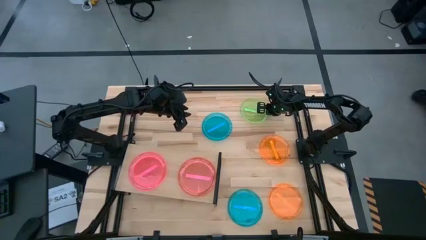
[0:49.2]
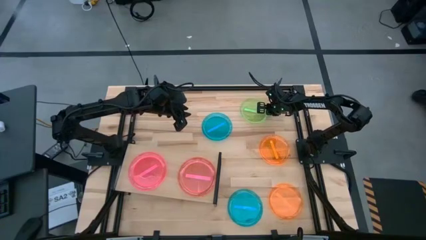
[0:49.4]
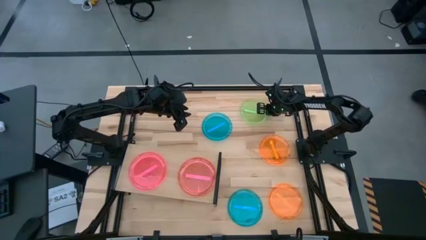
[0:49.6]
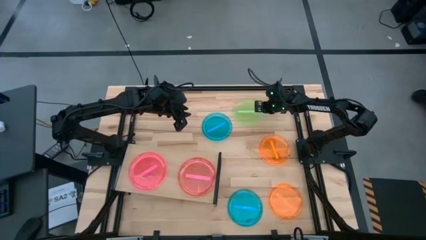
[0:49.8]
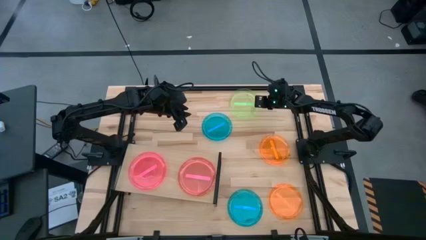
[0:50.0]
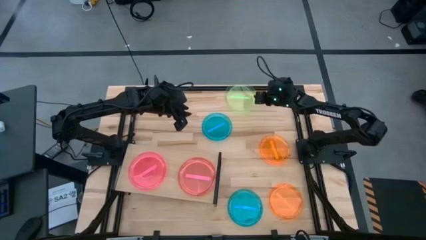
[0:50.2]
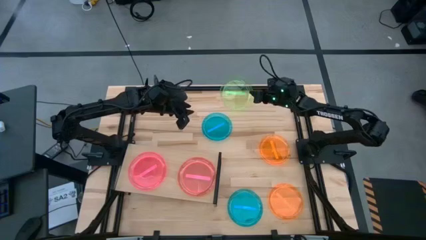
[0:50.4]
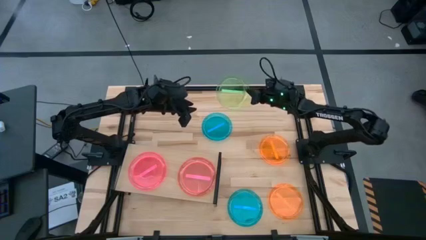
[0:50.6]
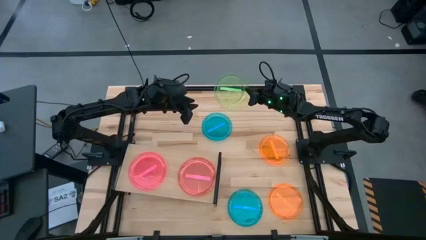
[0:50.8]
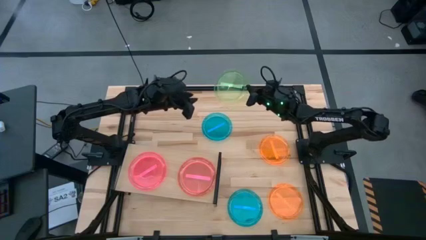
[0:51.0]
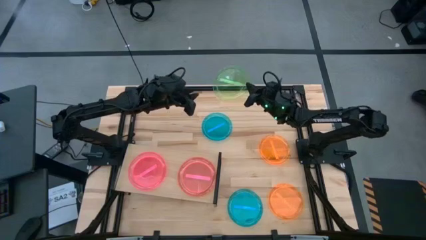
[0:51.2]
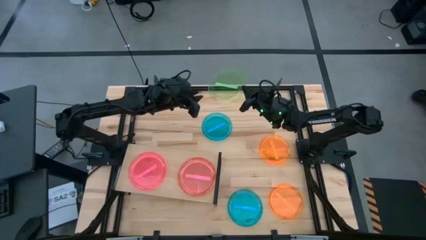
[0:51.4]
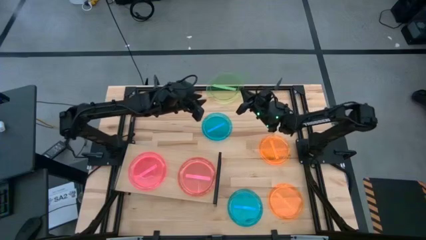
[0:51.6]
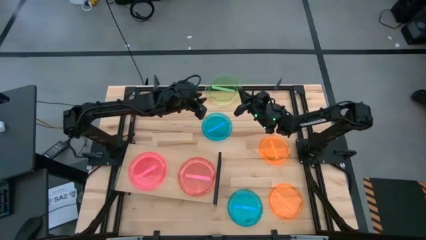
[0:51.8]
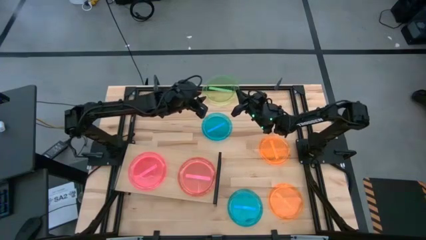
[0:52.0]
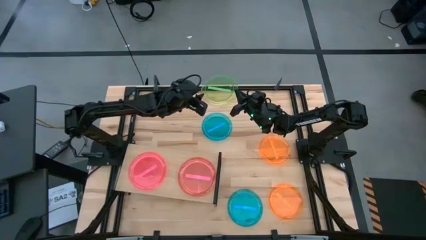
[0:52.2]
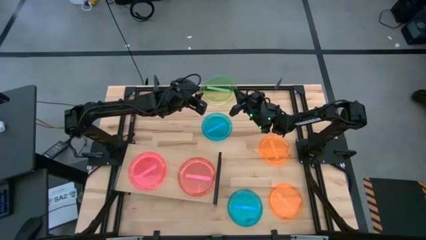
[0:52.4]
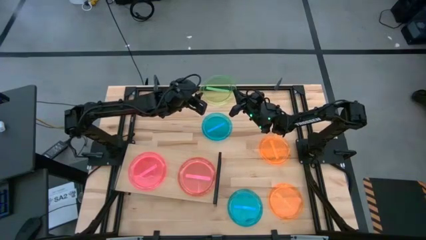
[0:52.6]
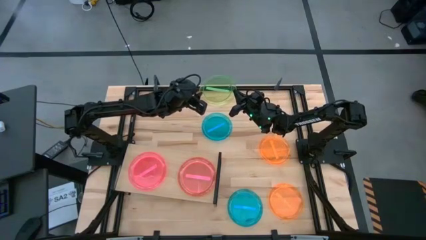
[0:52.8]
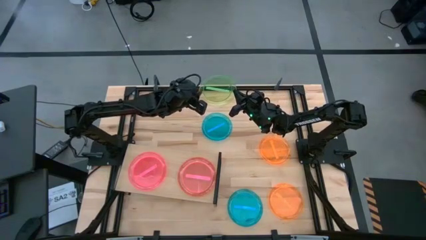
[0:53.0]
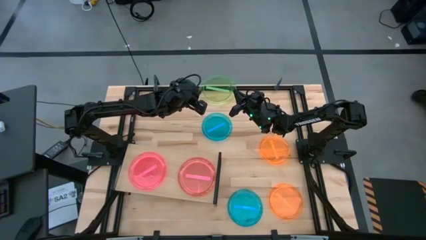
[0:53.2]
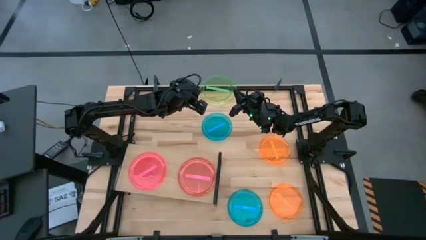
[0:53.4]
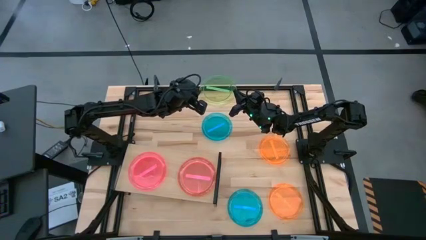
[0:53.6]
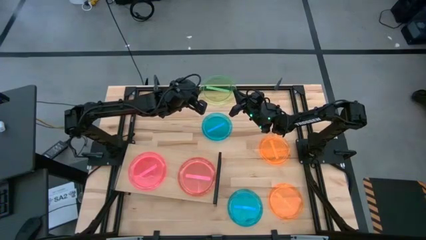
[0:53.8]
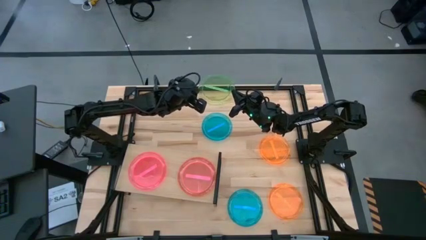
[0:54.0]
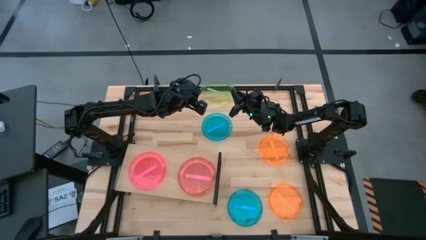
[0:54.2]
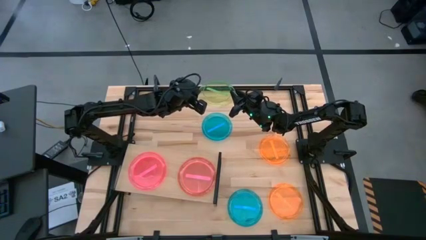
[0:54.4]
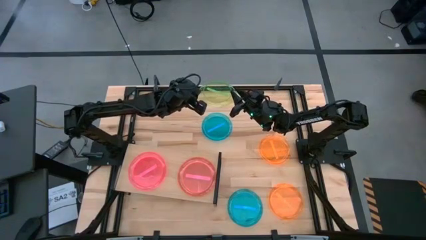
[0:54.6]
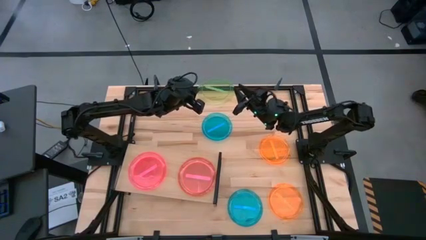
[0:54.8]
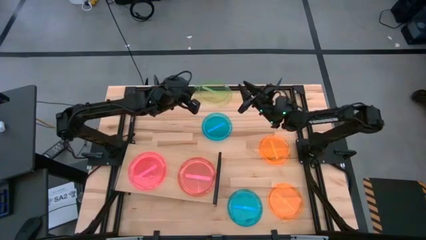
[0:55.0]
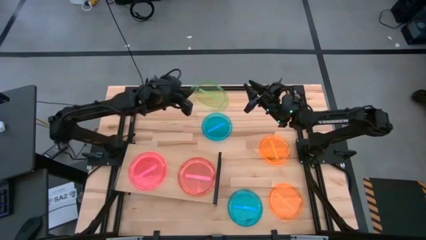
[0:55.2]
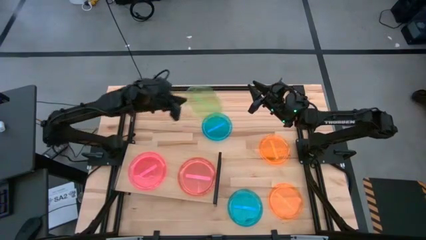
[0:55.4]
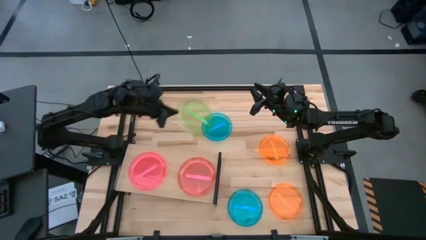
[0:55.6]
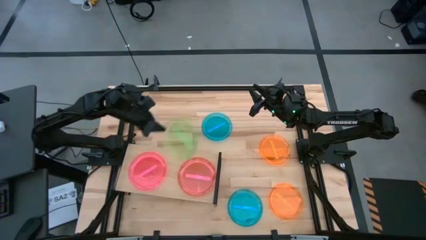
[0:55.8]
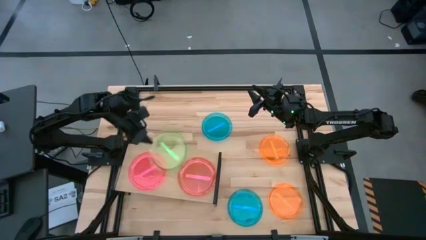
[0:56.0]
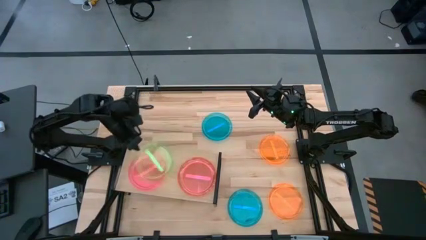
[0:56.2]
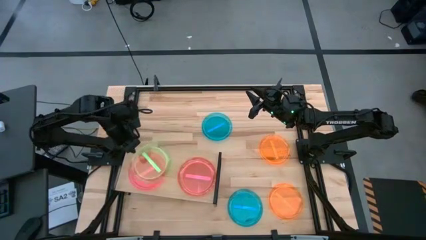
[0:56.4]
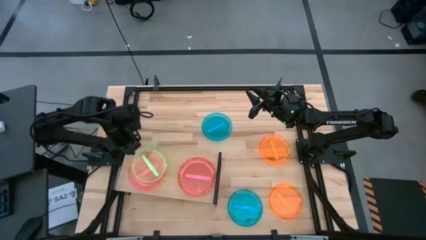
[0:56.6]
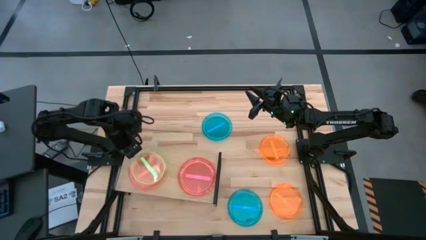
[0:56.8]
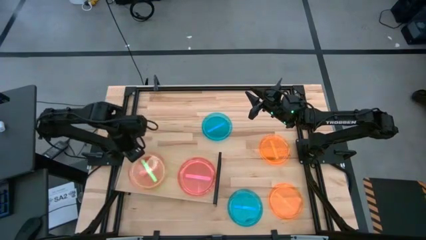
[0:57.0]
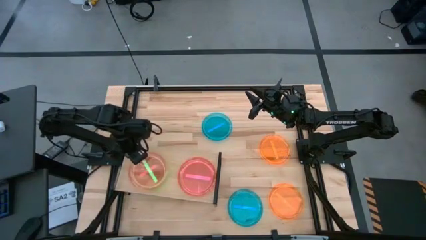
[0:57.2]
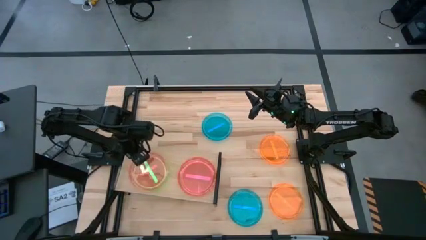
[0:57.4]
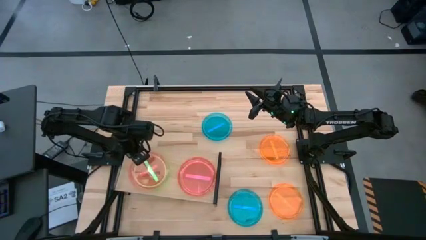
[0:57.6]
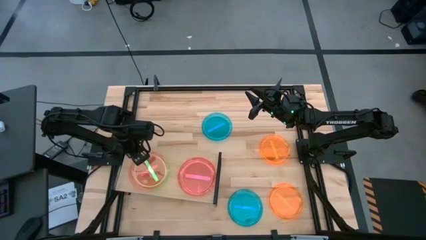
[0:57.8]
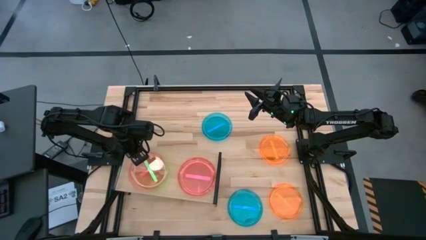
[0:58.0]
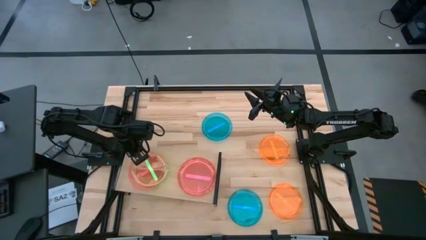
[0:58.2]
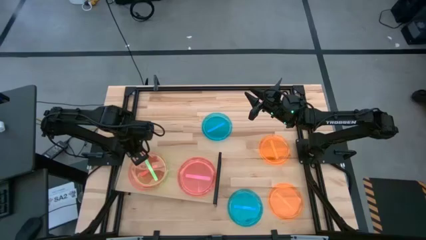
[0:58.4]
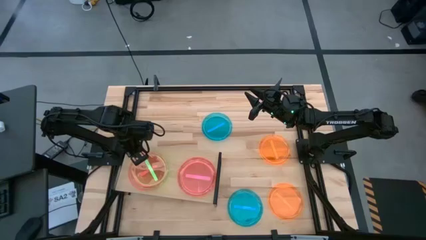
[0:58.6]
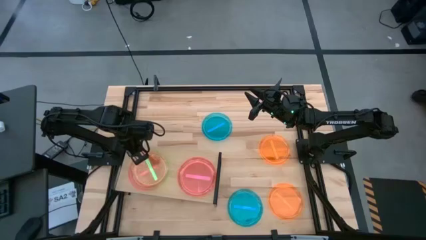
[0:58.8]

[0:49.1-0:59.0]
Task: Place and stack plates onto a shelf
Stack the green plate on top of the red plate on the shelf

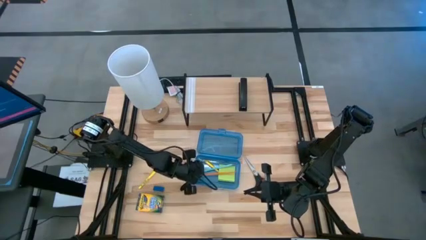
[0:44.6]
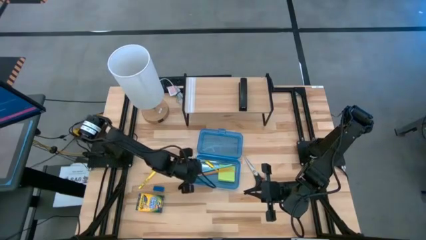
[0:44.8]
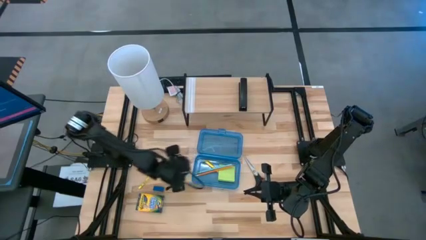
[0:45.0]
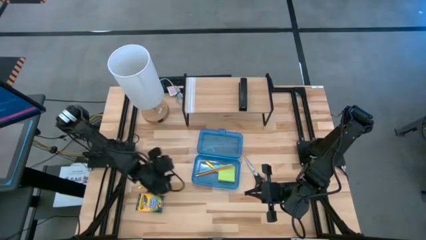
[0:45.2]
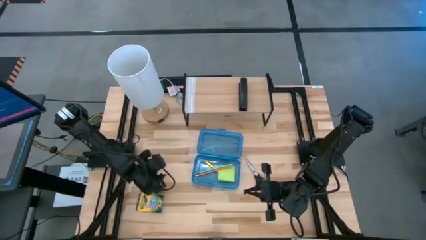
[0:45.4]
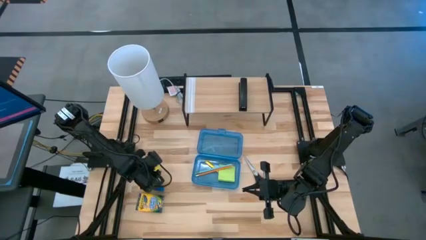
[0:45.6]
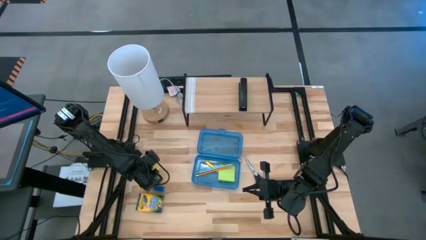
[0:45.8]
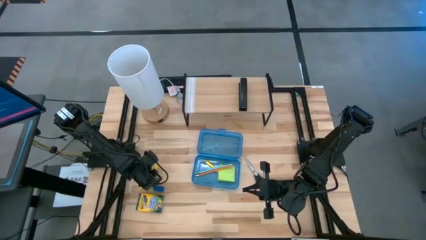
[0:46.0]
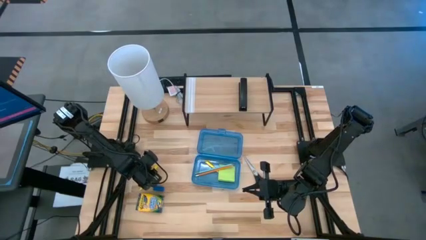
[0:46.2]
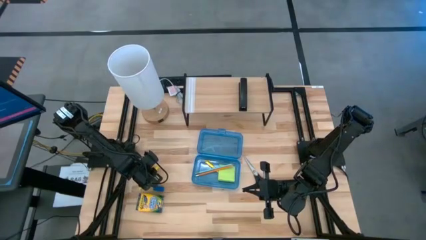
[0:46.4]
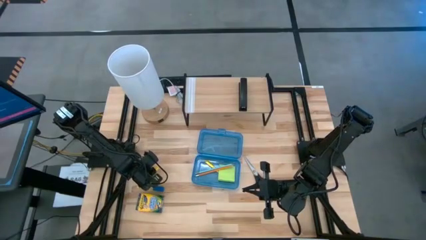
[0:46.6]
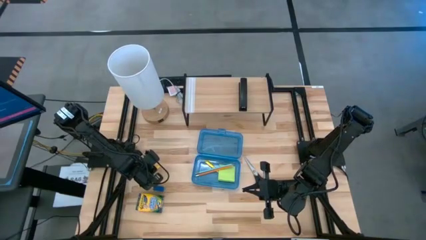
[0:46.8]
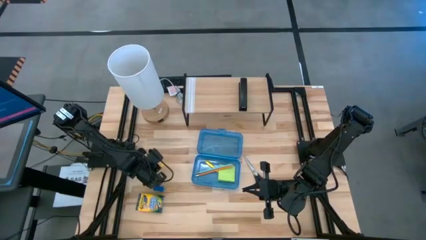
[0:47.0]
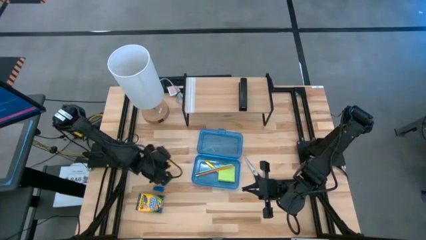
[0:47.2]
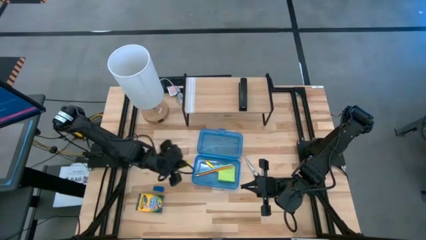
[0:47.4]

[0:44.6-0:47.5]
Task: Pack school essentials
Put the yellow pen into the blue supply box

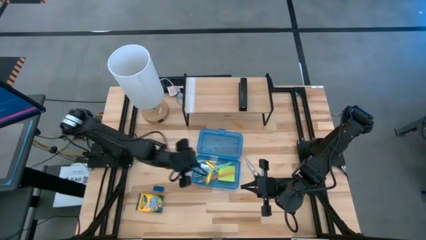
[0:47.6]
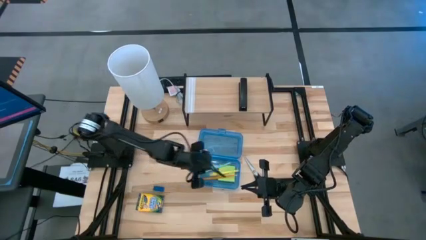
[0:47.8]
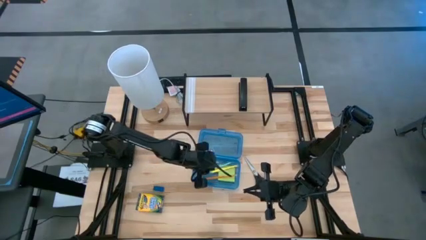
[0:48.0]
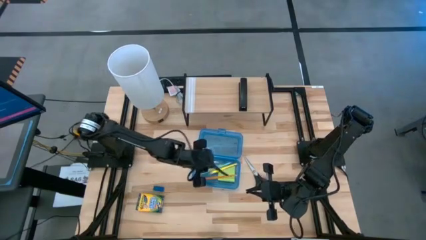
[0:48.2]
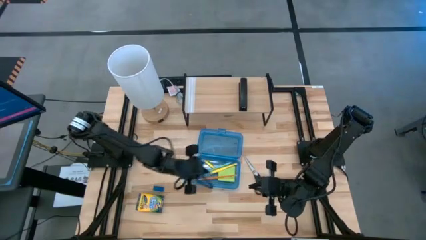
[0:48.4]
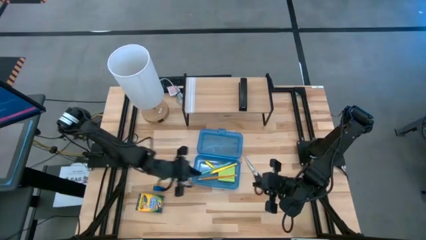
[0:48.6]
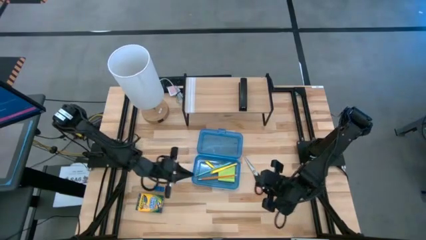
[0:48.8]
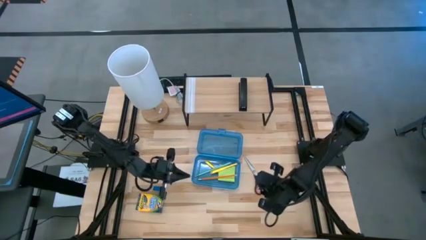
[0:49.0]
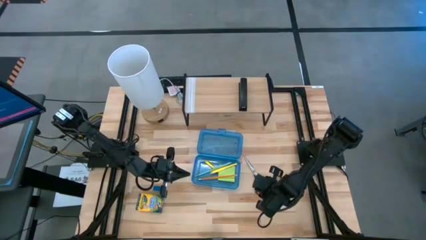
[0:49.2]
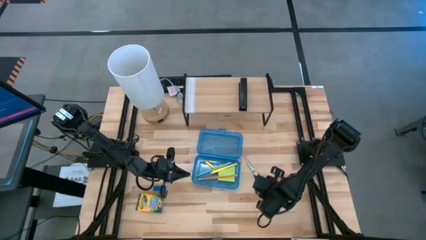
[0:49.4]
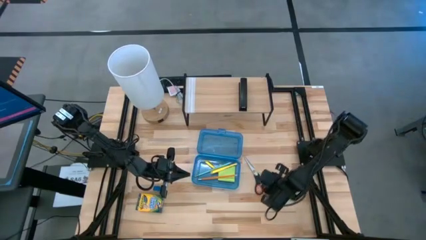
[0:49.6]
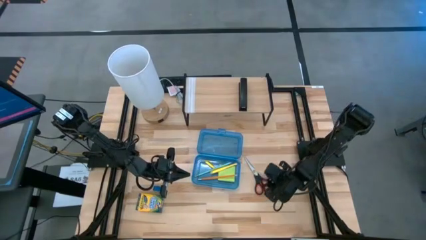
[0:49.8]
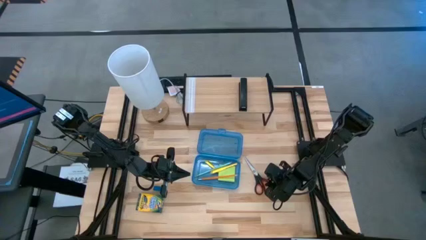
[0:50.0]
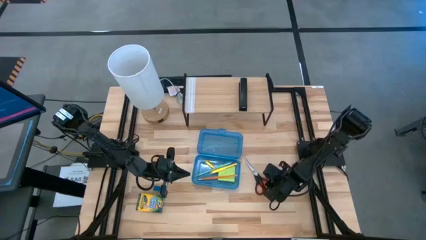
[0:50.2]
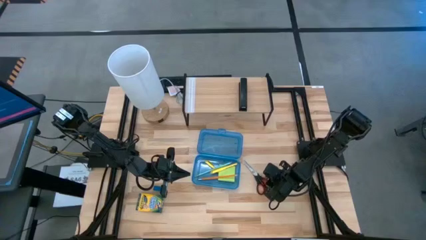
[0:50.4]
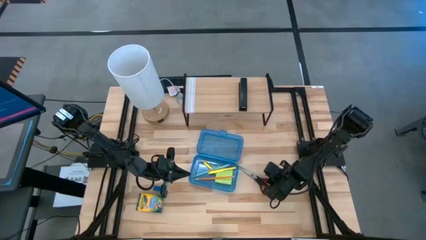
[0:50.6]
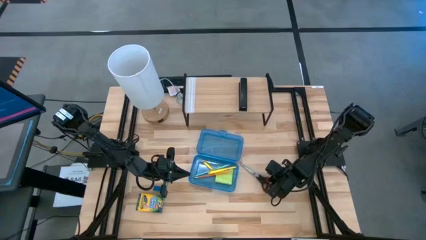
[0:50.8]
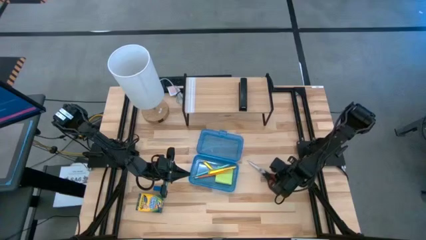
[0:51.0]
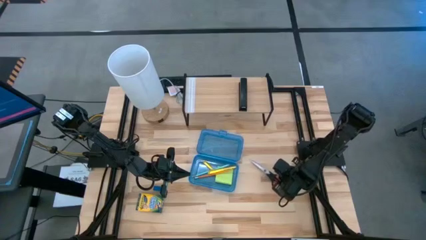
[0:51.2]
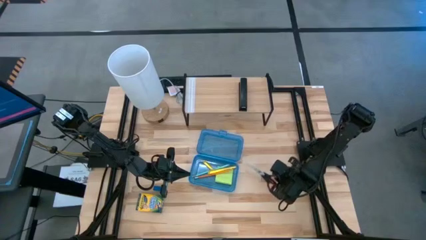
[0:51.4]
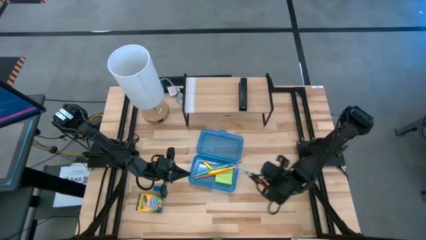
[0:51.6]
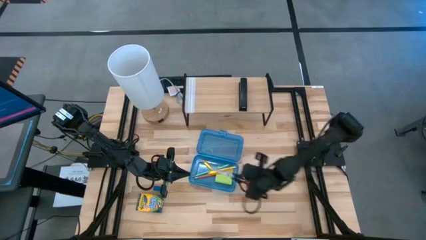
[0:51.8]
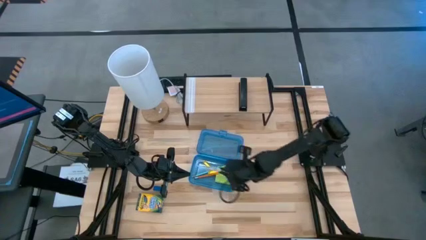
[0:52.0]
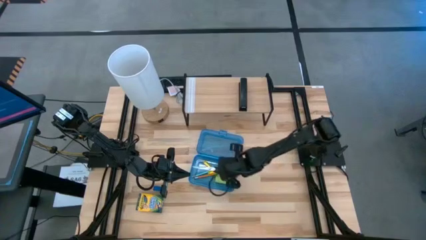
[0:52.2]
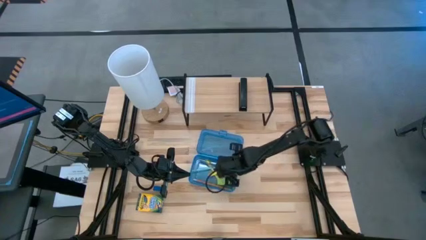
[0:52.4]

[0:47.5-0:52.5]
Put the black scissor into the blue supply box
